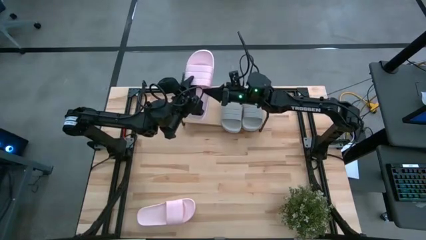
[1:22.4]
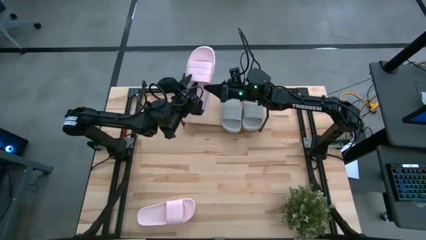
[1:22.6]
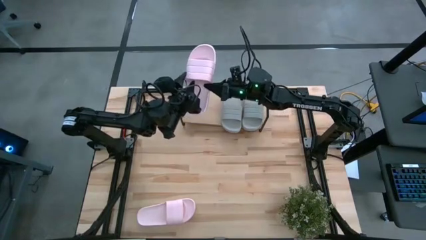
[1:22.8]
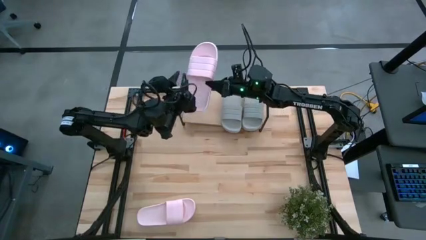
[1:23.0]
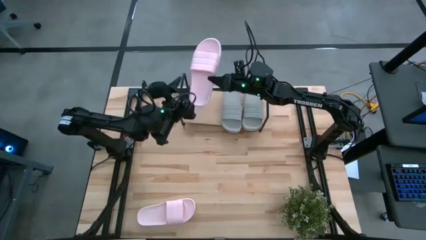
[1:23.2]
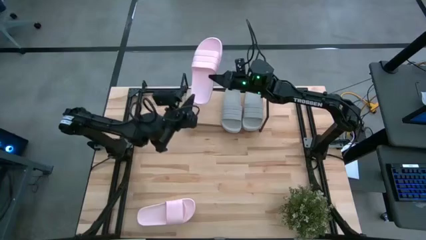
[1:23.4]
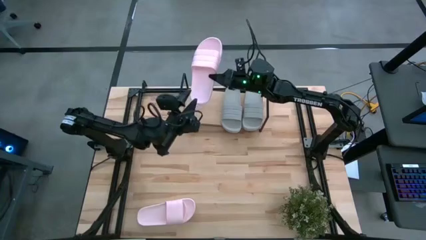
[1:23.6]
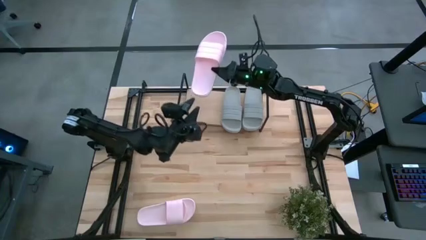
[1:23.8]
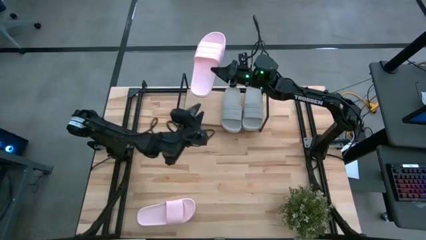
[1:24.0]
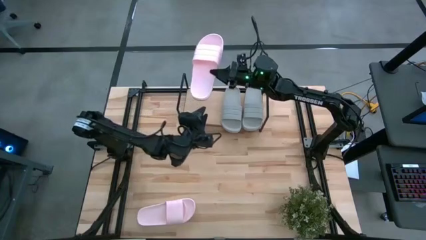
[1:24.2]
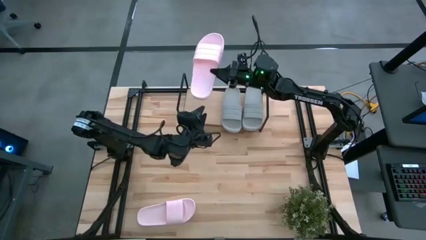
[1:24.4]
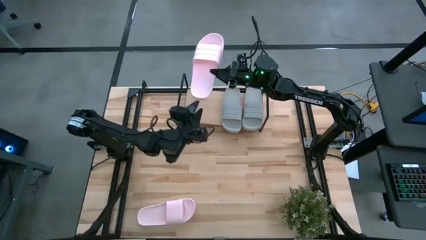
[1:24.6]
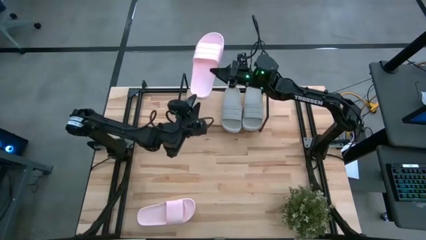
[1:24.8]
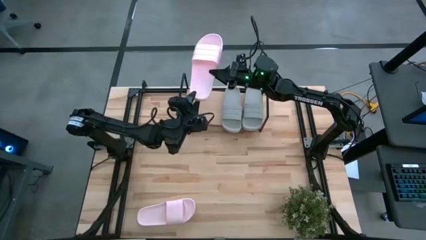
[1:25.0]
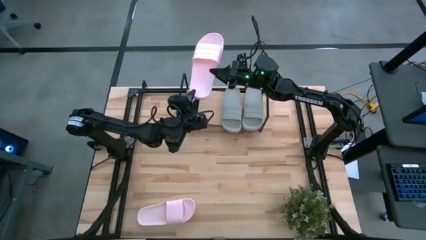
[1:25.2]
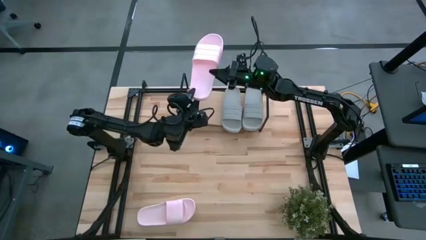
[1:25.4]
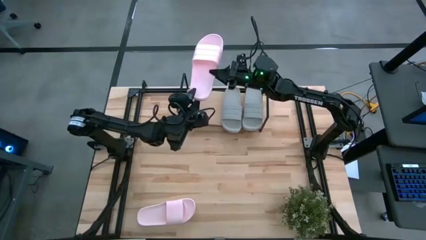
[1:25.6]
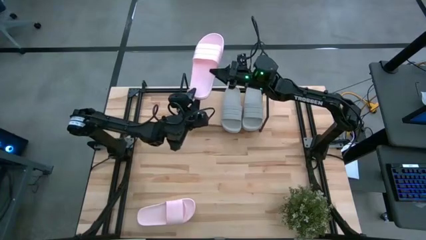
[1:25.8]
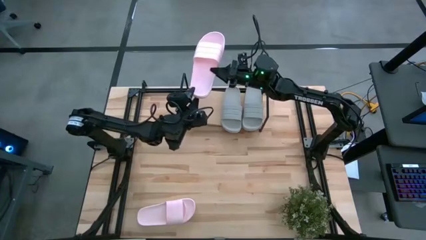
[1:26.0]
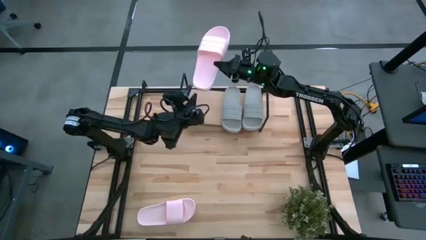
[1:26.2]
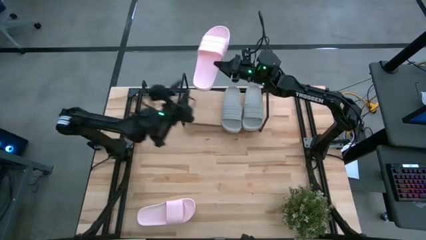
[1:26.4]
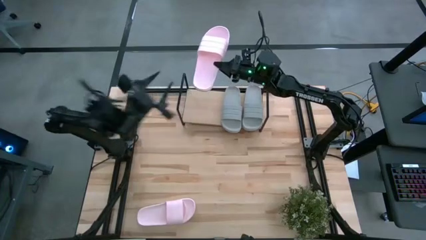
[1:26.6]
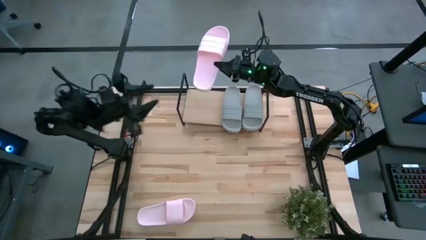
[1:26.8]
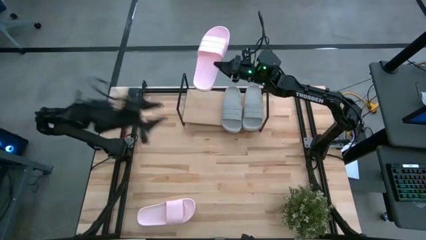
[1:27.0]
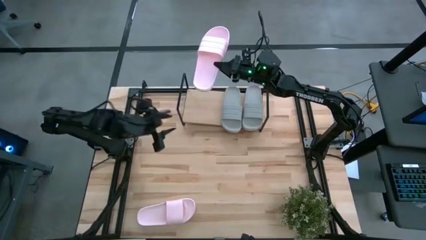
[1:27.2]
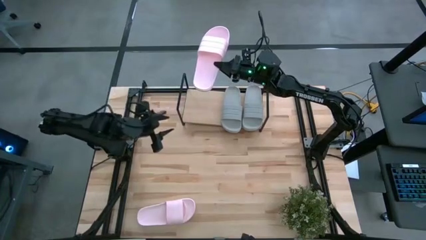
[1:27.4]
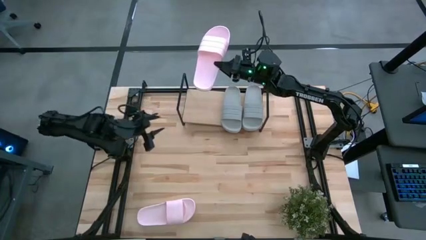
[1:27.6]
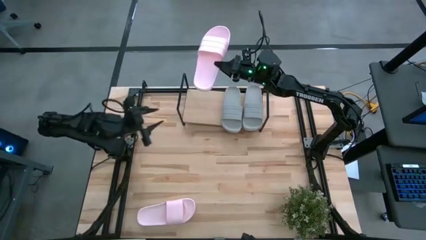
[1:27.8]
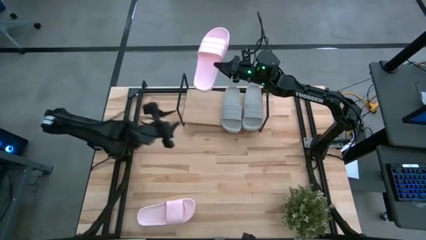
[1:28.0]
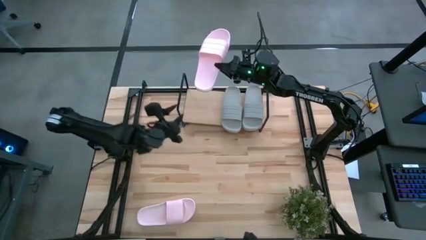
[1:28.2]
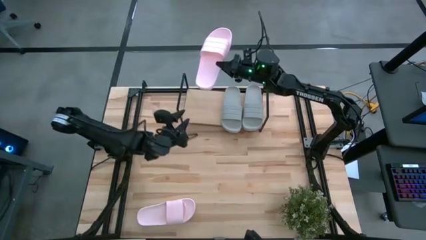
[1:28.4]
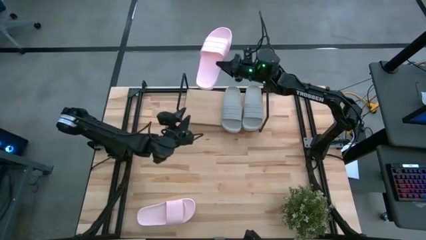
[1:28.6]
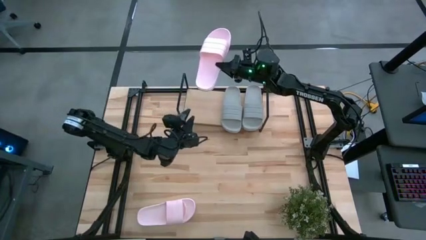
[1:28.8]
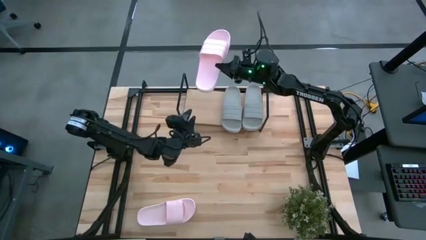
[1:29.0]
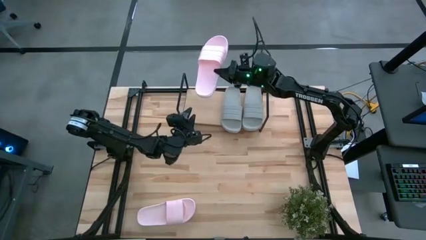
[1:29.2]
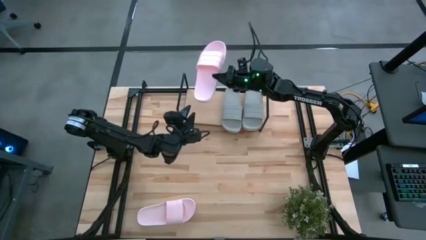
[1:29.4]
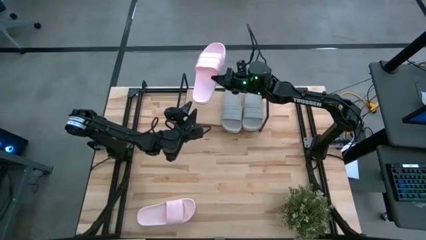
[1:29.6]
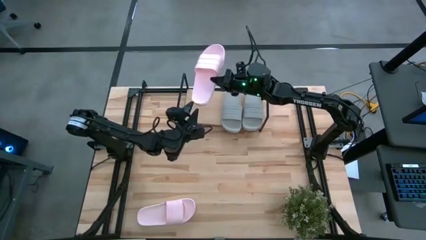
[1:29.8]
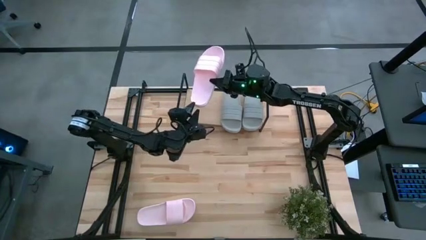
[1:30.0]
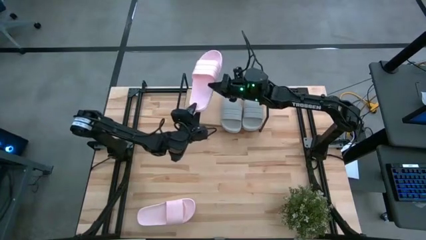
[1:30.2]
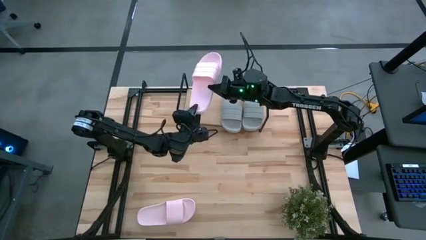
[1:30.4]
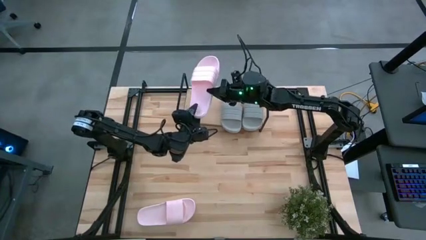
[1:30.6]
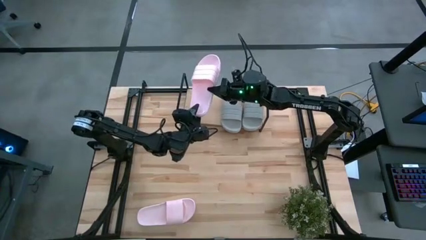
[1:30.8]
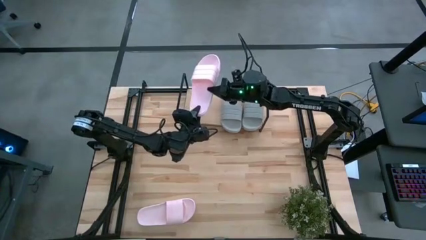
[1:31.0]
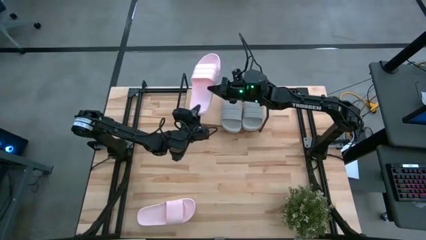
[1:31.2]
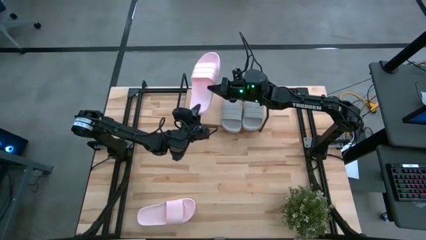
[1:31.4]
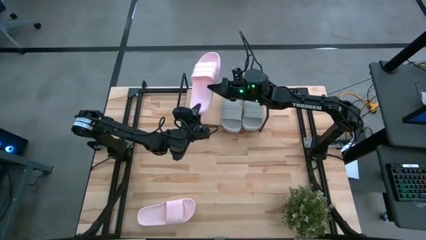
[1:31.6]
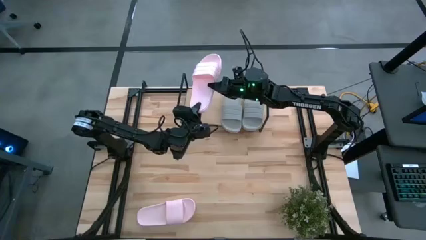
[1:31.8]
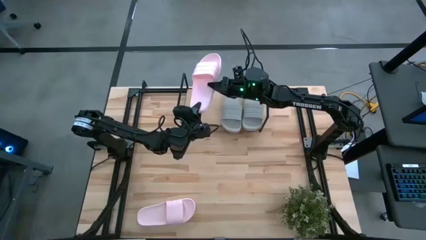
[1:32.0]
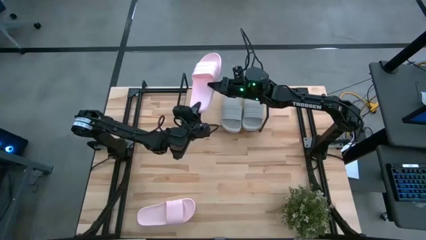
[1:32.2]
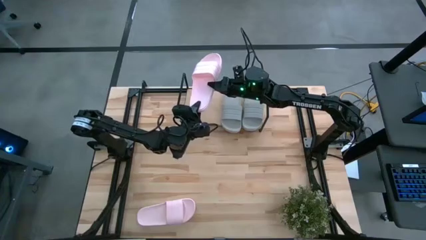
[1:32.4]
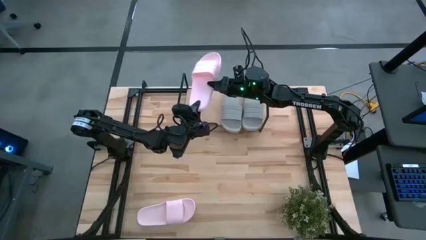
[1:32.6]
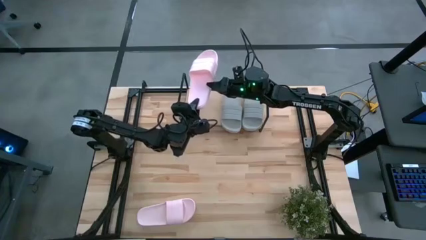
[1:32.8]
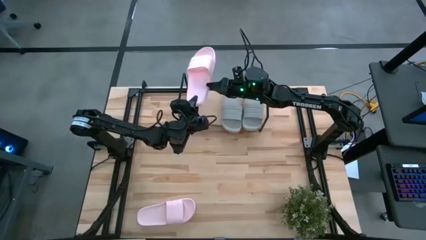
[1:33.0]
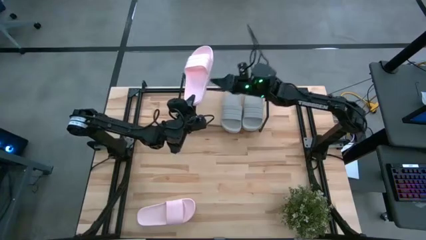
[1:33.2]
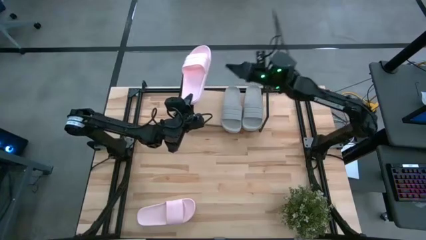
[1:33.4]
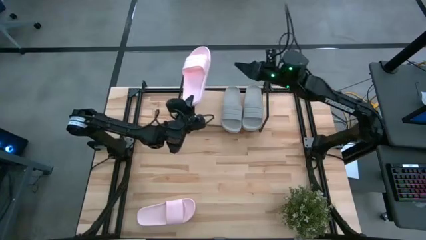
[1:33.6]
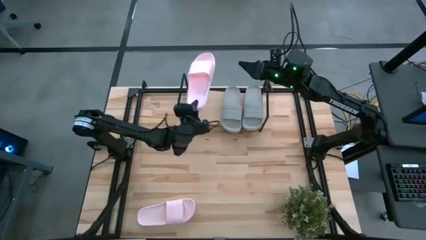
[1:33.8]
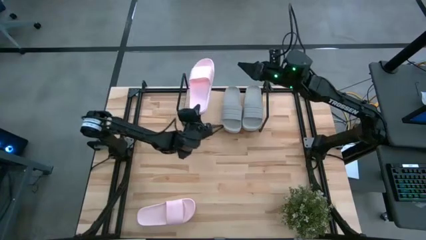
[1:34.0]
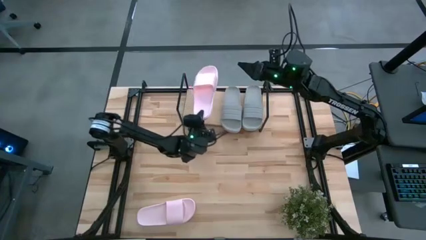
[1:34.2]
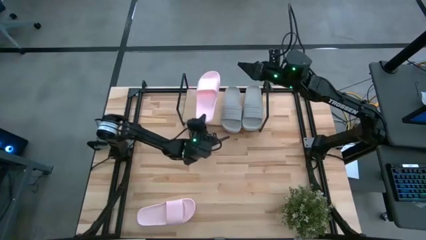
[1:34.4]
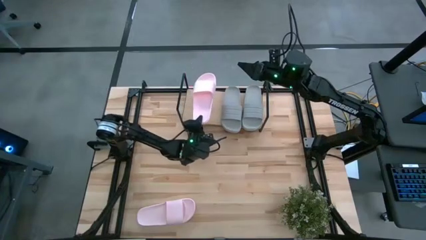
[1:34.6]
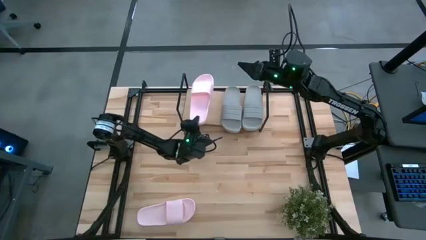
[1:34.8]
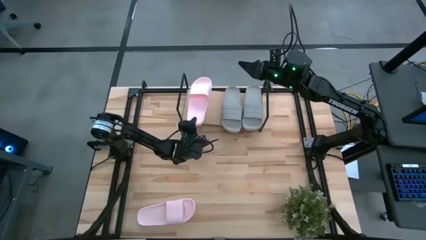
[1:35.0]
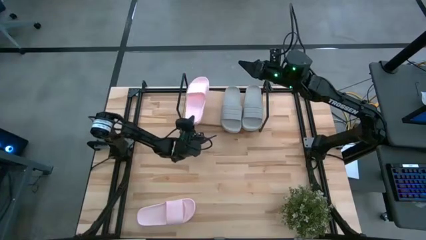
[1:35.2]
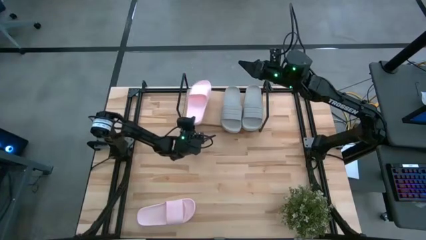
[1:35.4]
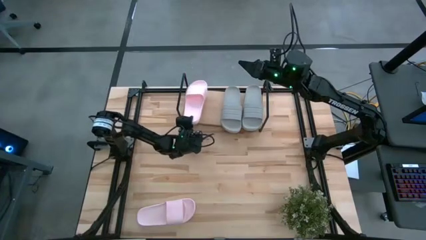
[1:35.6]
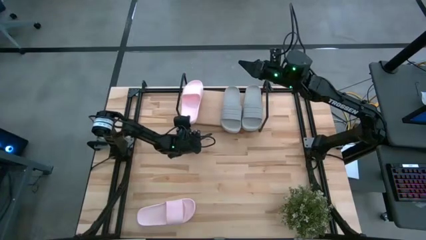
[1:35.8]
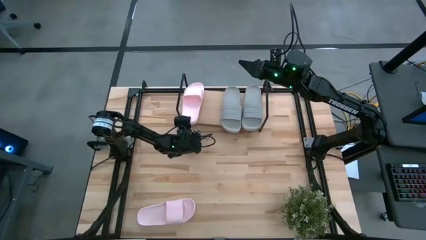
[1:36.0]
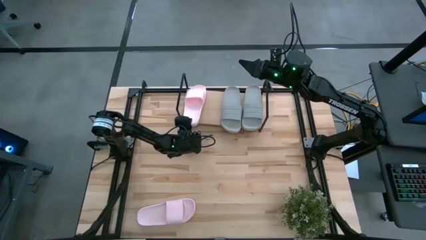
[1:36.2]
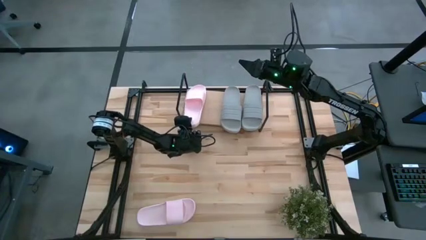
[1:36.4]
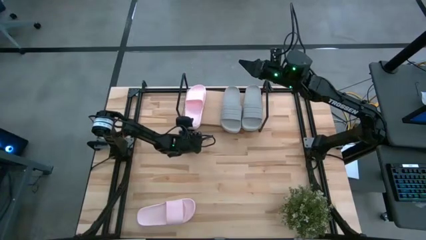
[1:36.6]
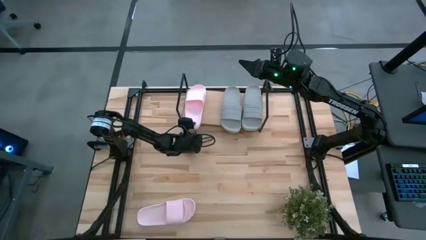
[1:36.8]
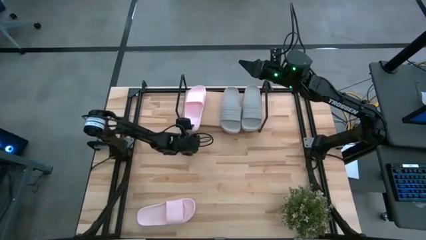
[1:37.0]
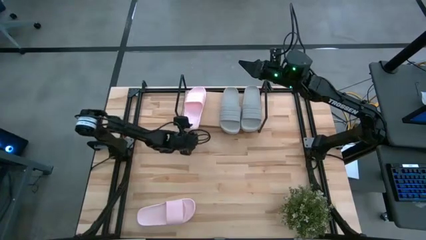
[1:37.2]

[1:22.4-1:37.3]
Task: Pick and place slides into the shelf
Put the top pink slipper on the shelf

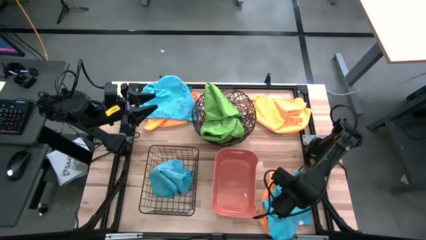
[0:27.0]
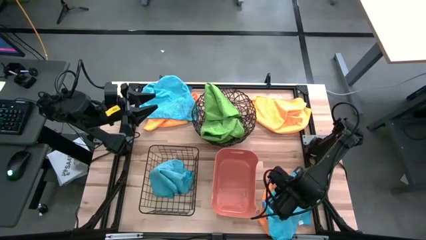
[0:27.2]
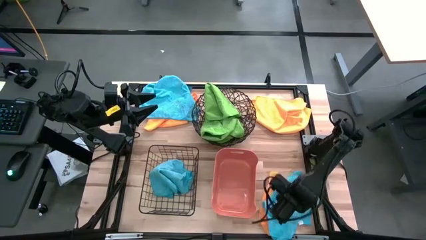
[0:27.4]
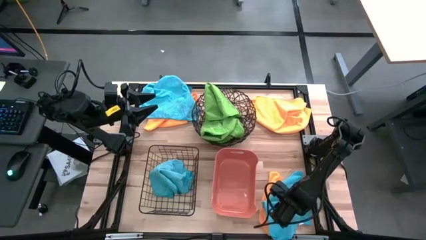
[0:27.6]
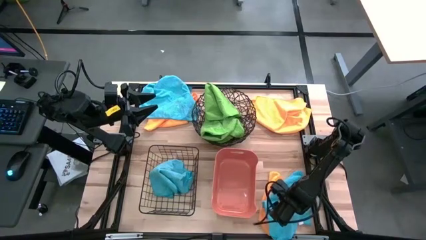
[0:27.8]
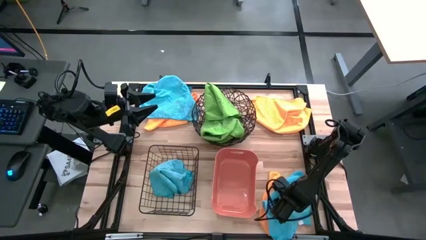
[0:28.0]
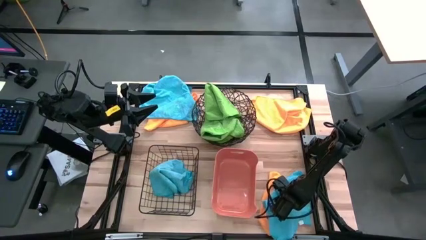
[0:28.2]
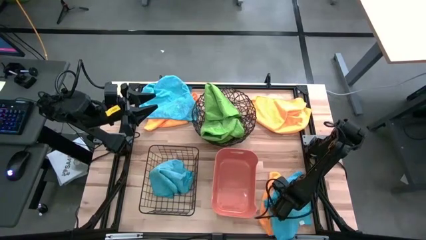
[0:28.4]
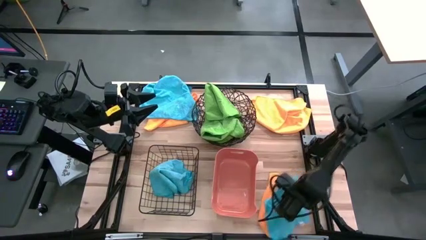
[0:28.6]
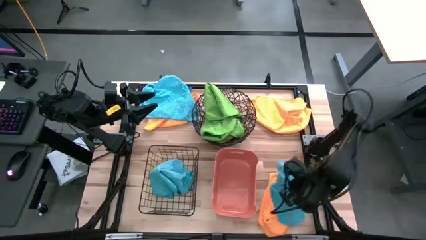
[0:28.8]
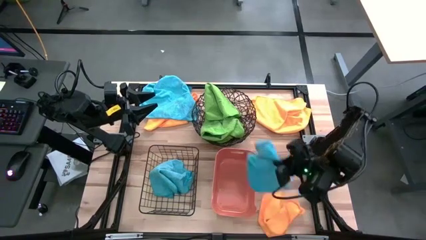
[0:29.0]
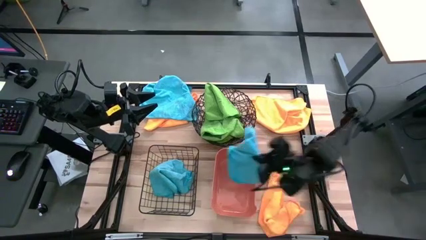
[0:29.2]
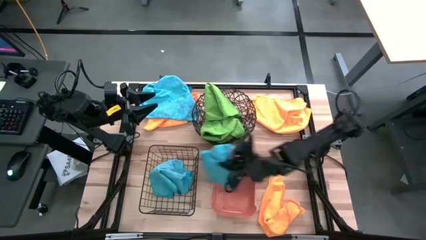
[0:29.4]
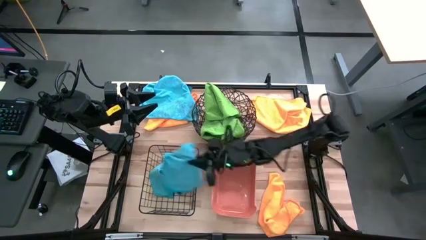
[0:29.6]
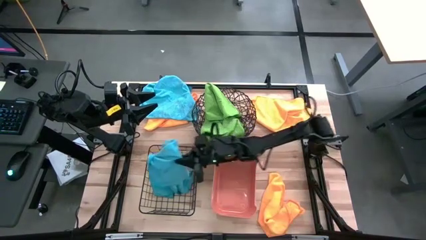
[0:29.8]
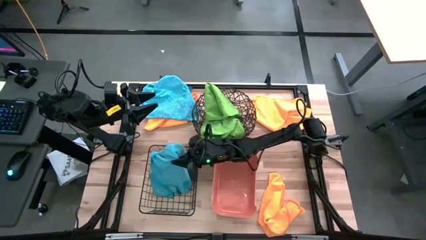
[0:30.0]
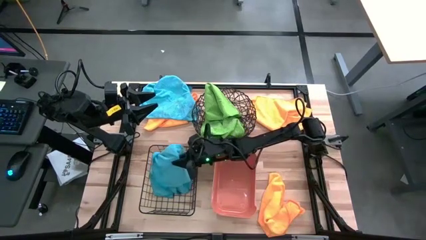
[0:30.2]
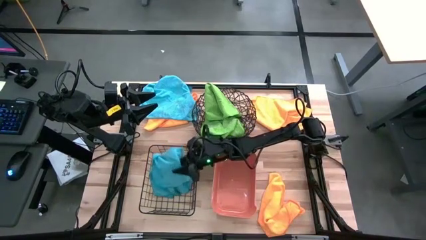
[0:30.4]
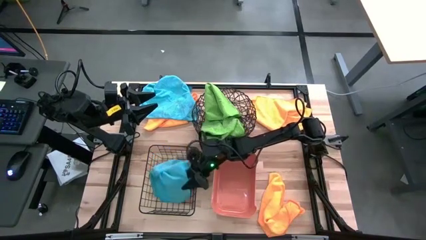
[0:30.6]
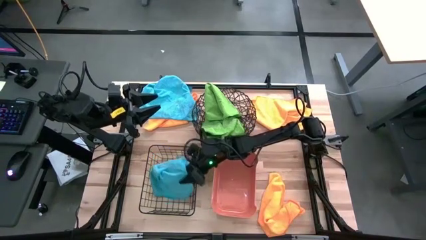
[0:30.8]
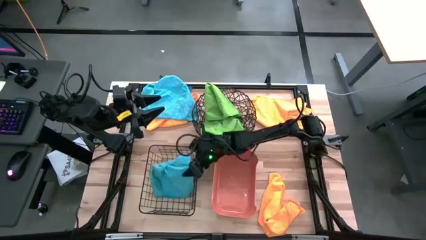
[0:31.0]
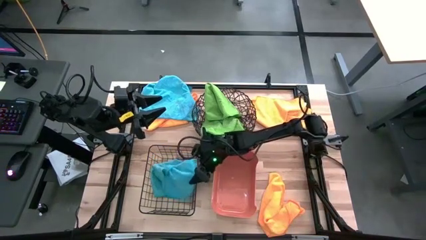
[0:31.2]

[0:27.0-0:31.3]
Task: Sort microfiber towel by color & place in baskets
Put the bottom blue microfiber towel into the black wire basket
